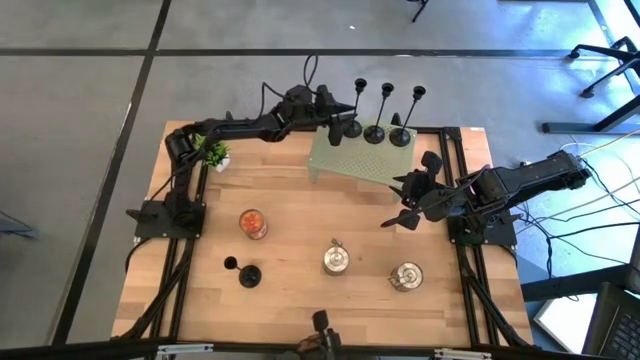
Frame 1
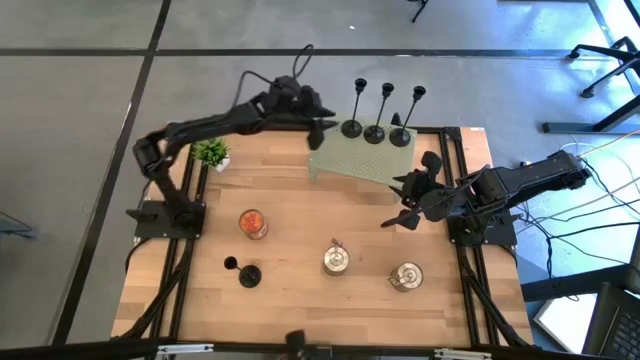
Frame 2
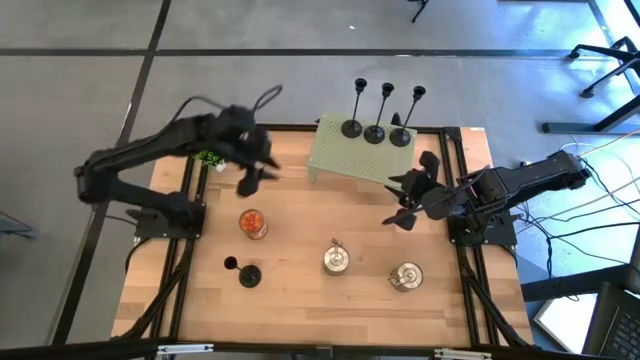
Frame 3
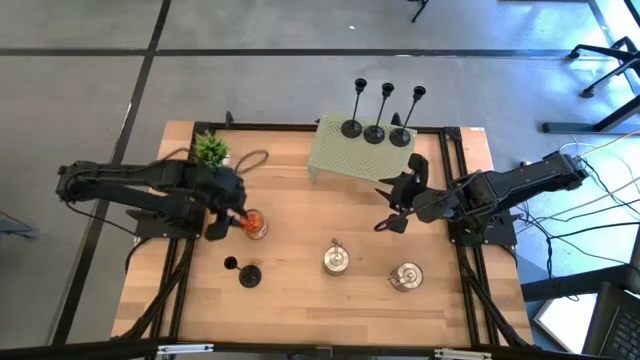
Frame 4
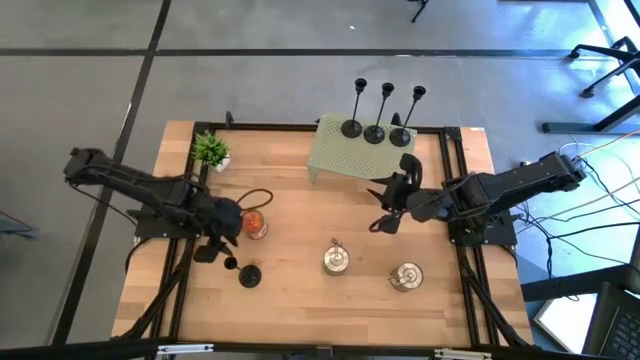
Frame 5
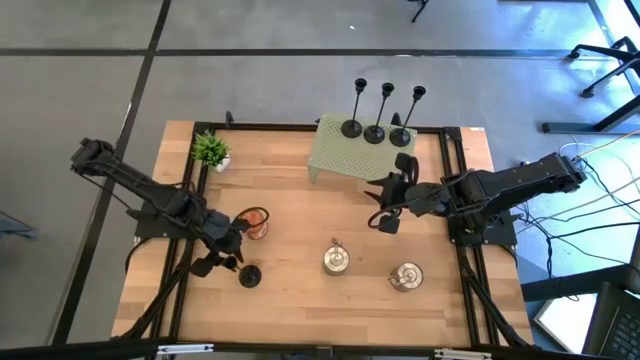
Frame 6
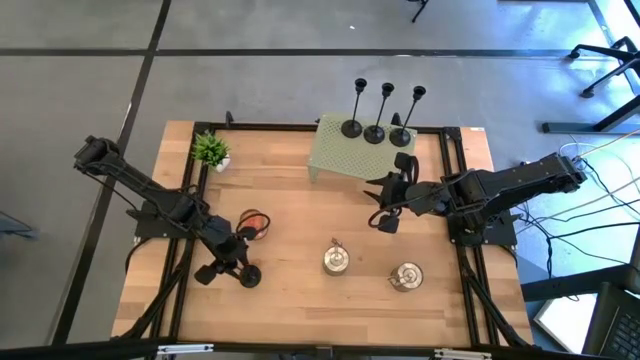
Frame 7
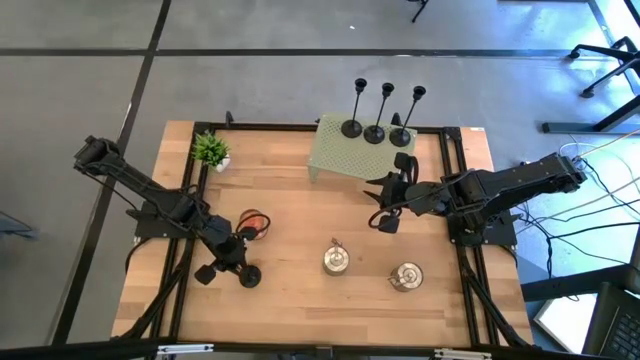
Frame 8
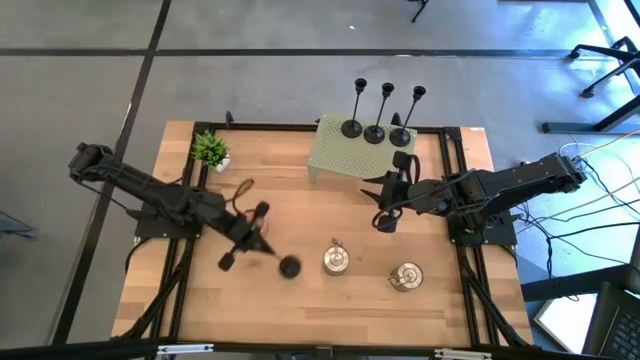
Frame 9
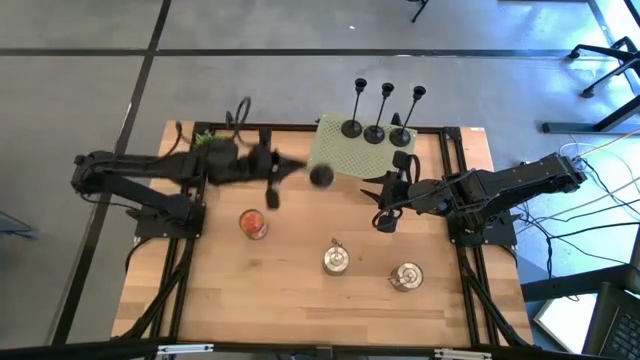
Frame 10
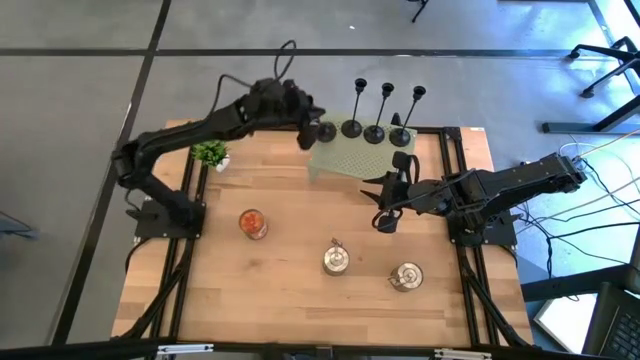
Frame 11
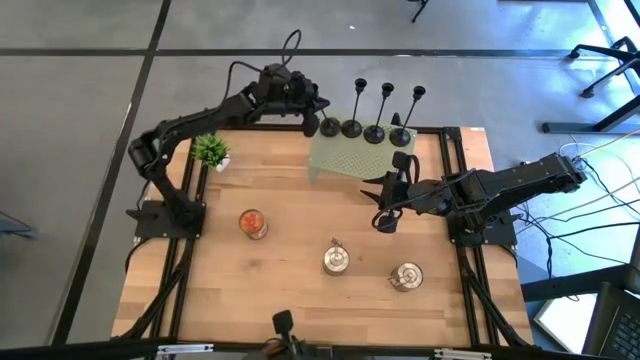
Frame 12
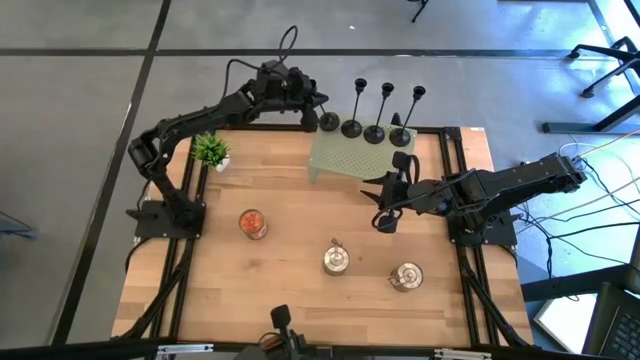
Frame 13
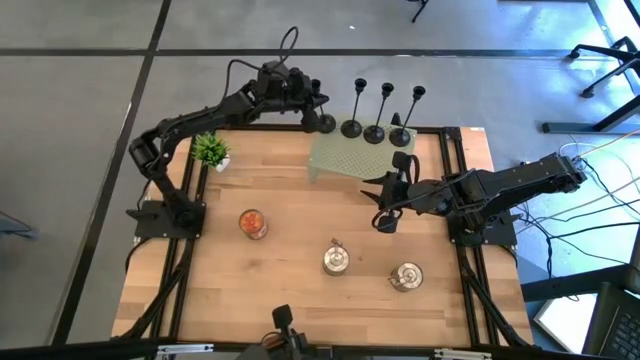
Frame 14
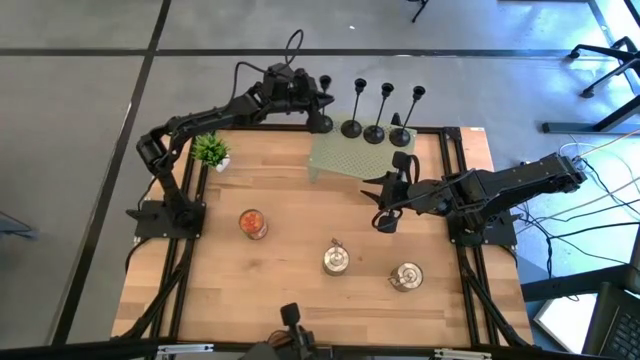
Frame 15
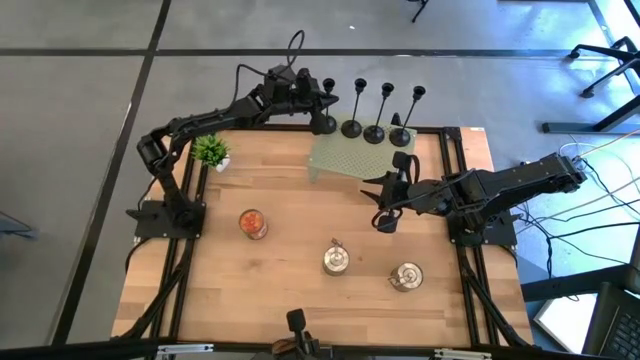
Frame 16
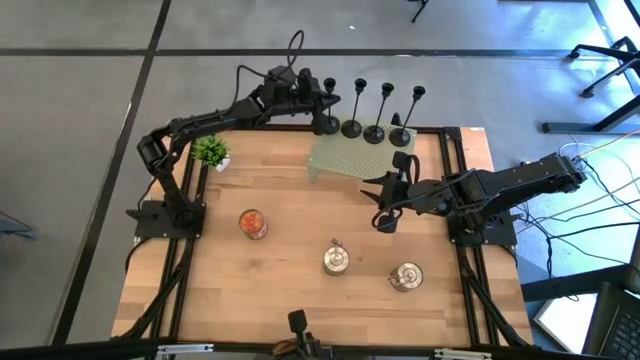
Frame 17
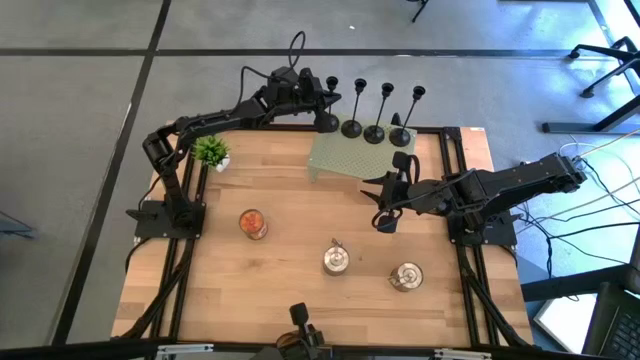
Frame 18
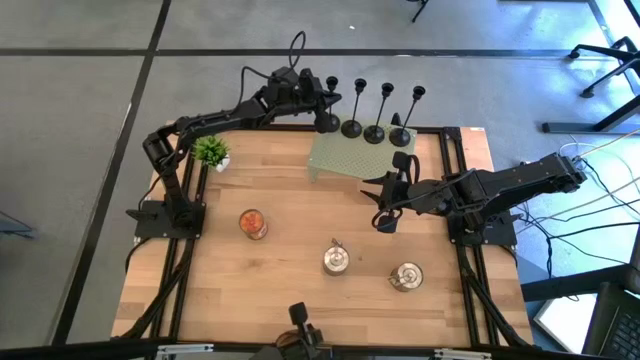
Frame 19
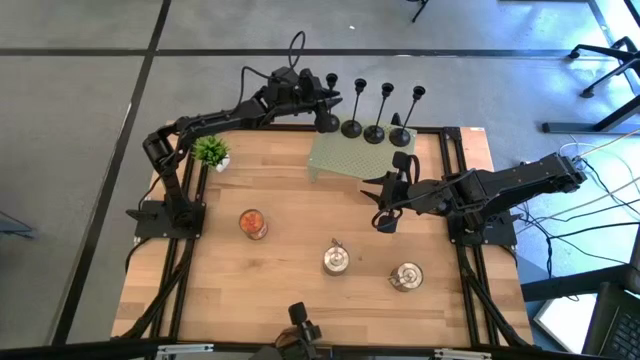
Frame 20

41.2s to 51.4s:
Task: Pick & Place candle stick holders
Put the black candle holder on the shelf

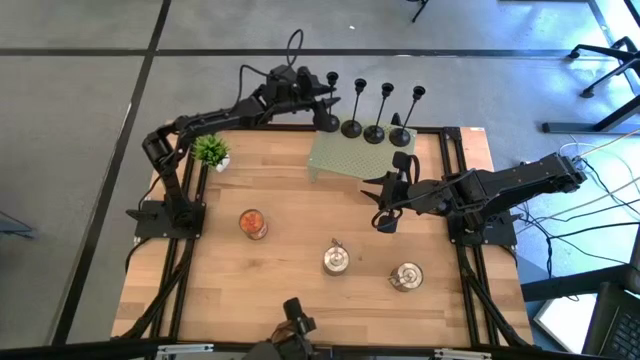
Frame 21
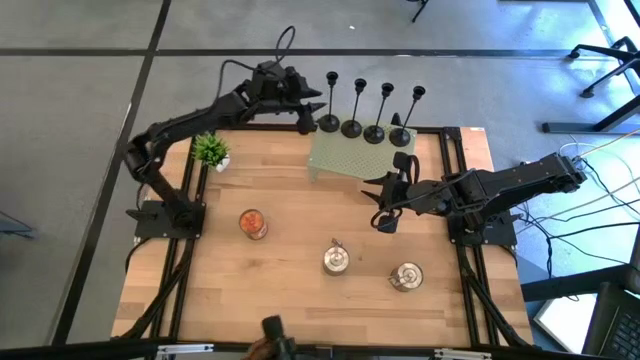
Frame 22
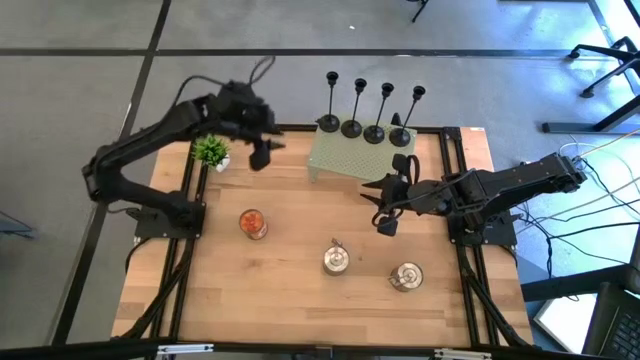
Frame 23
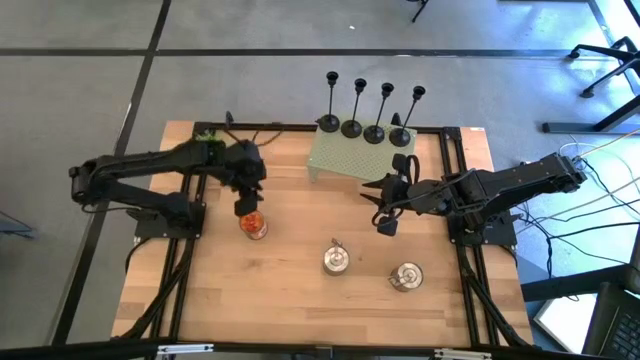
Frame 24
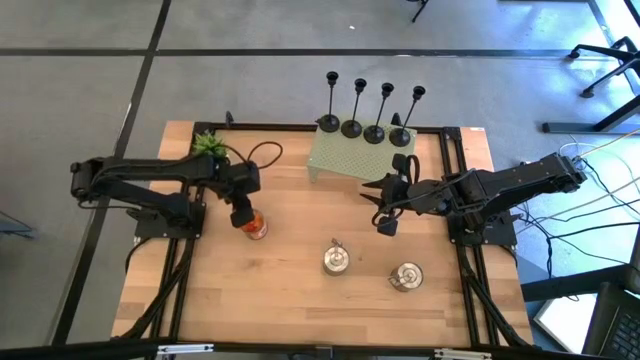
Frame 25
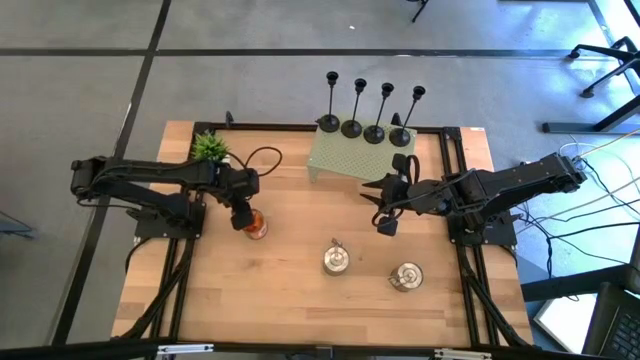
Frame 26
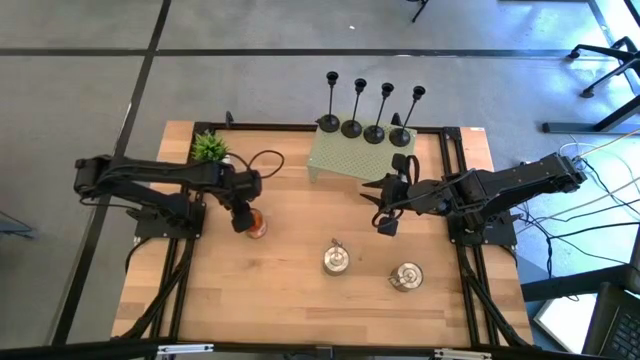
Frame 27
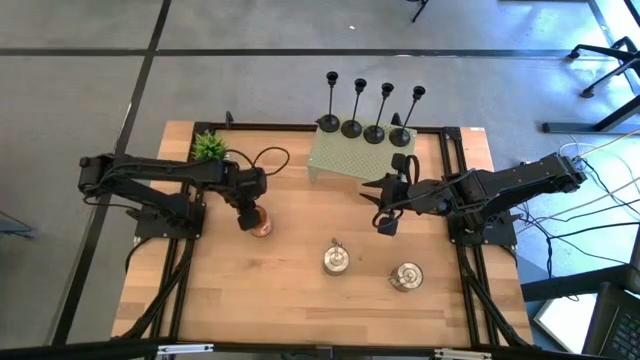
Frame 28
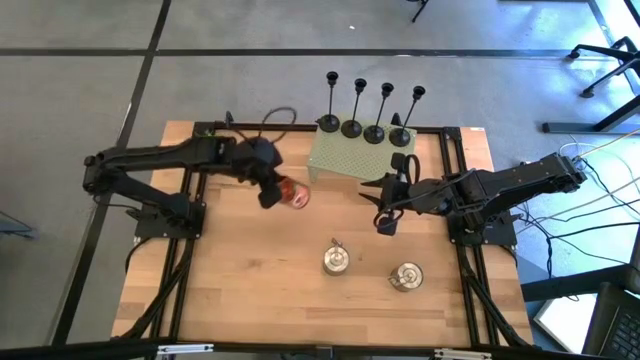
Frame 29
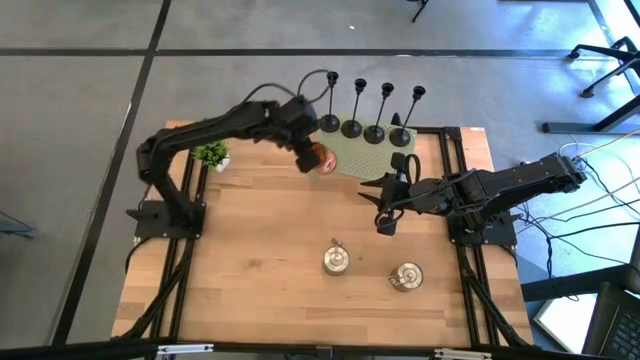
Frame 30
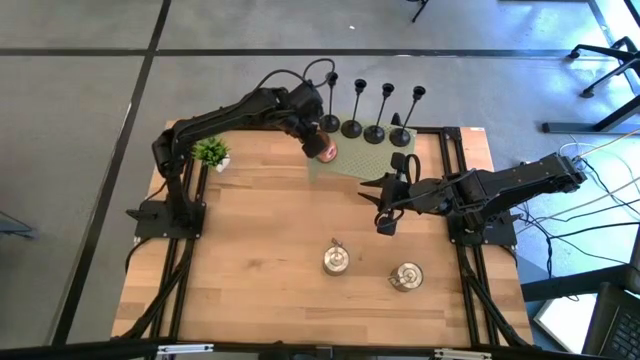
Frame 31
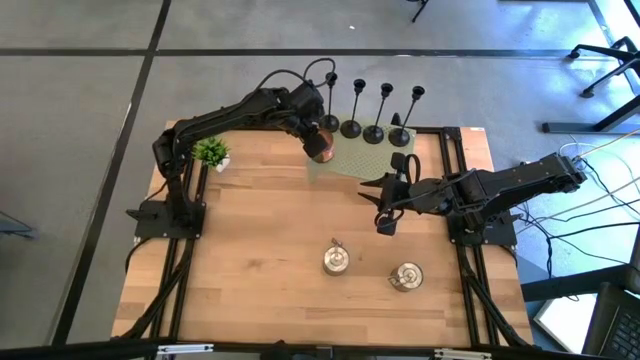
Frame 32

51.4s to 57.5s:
Put the top orange scented candle on the shelf

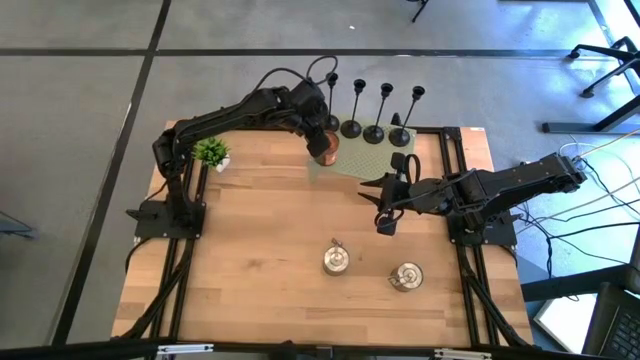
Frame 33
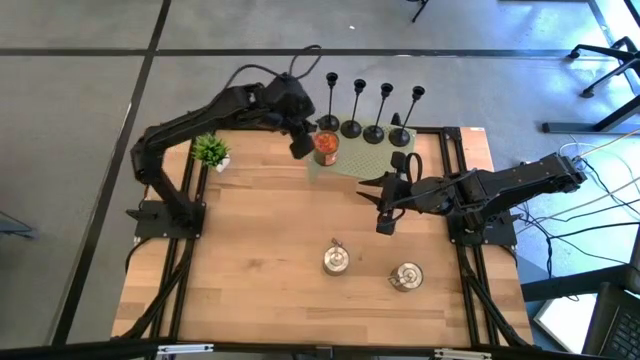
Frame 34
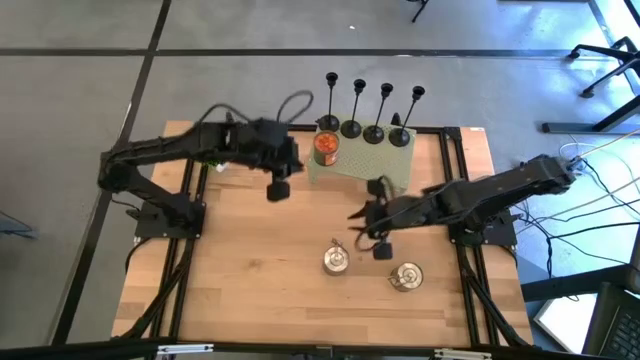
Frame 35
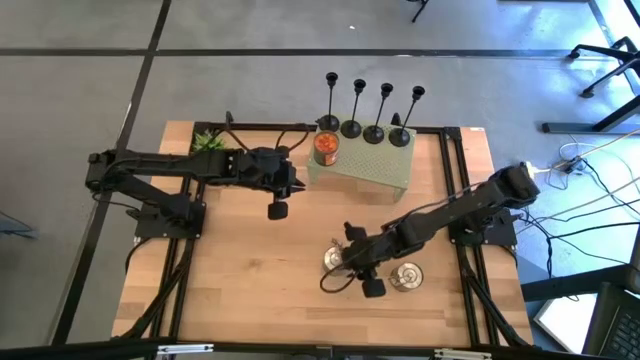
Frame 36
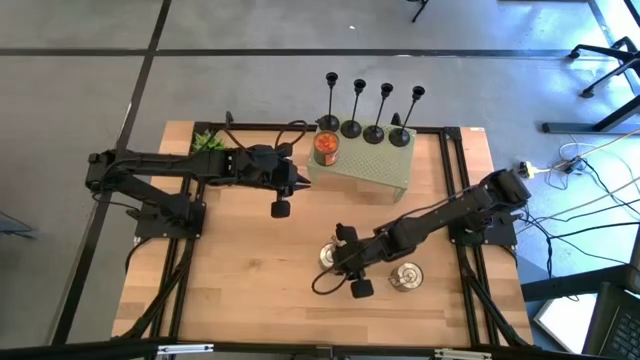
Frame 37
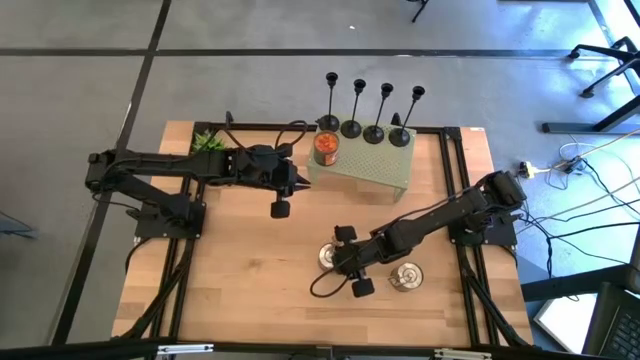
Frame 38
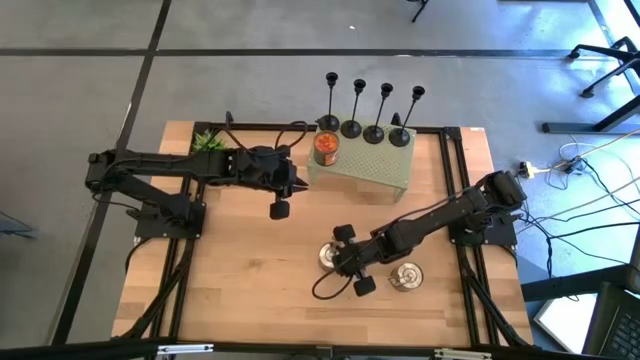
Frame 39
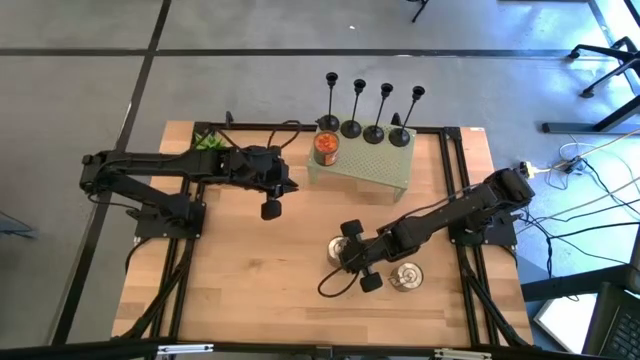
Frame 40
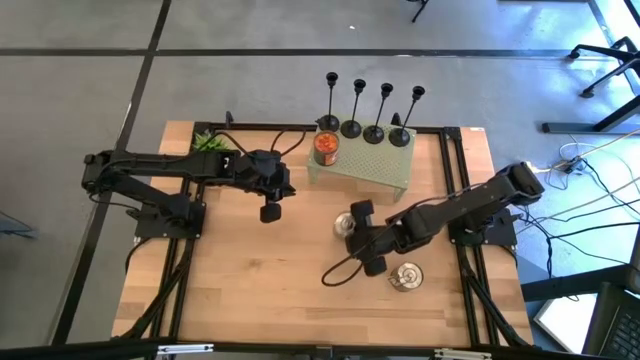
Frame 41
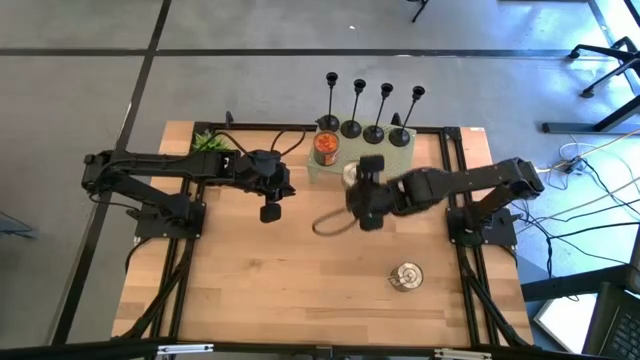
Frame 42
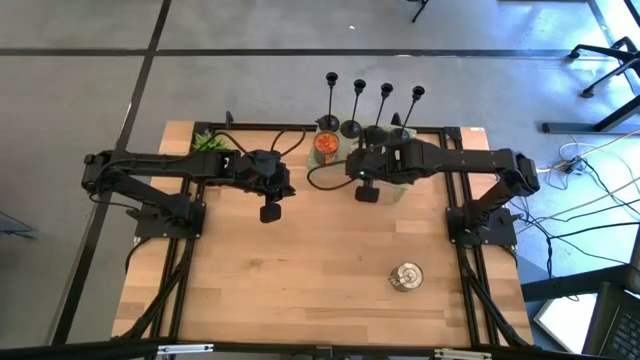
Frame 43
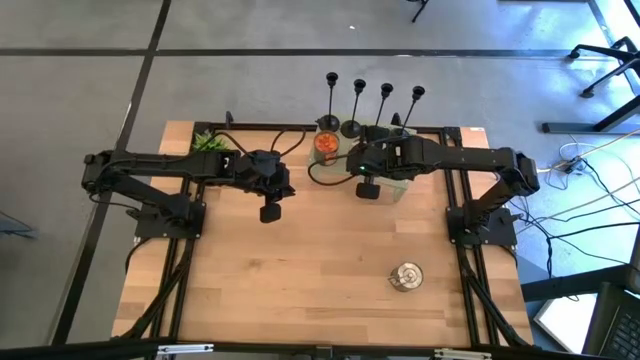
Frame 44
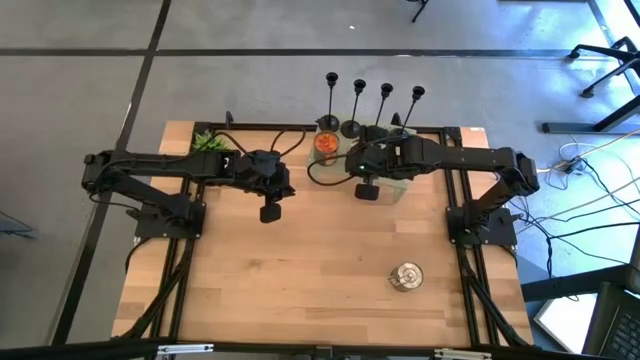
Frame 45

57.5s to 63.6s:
Put the left silver scented candle on the shelf
